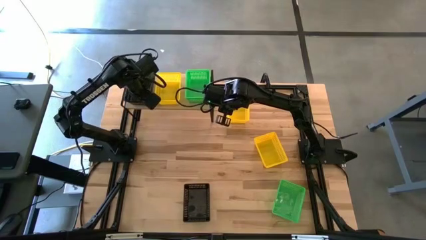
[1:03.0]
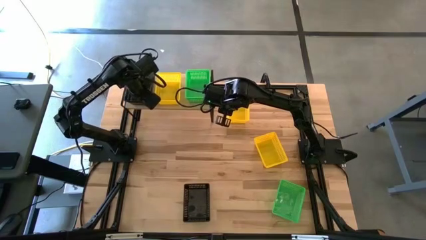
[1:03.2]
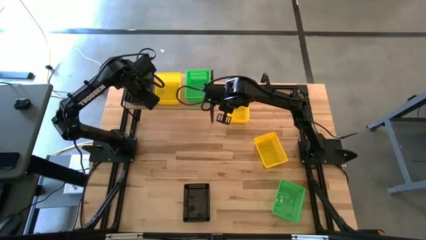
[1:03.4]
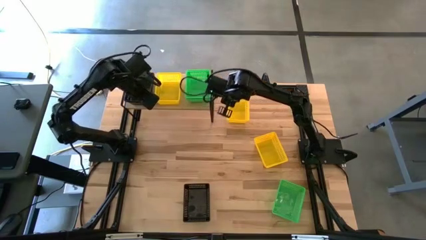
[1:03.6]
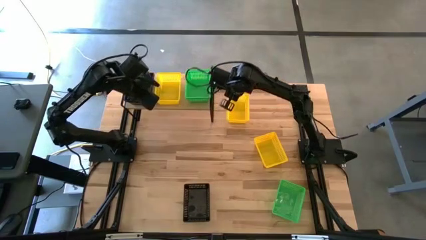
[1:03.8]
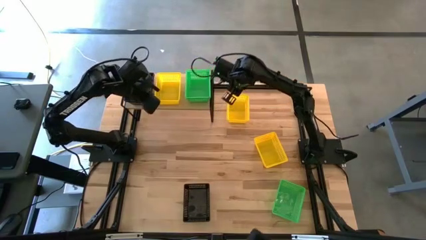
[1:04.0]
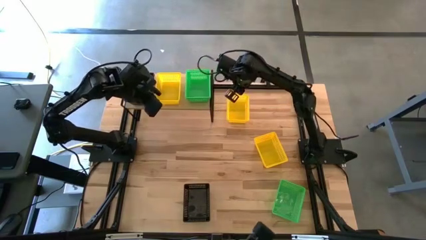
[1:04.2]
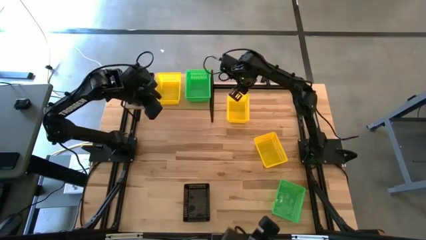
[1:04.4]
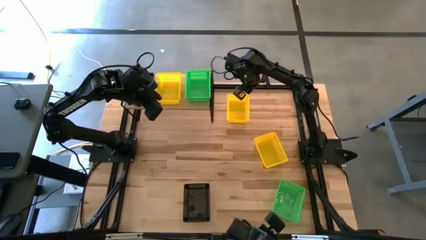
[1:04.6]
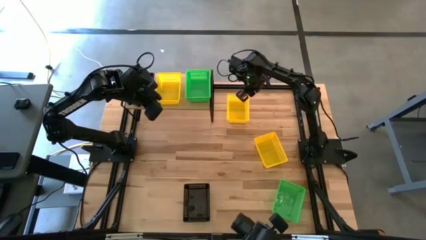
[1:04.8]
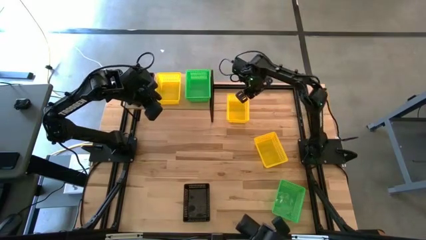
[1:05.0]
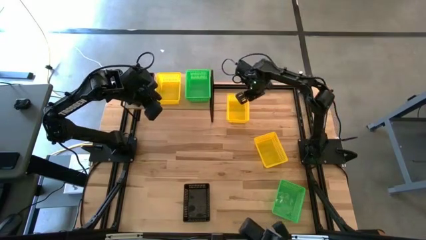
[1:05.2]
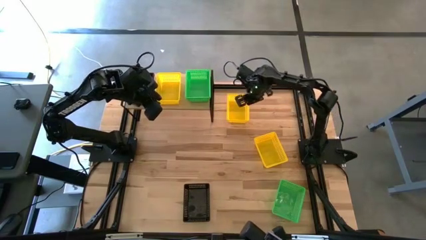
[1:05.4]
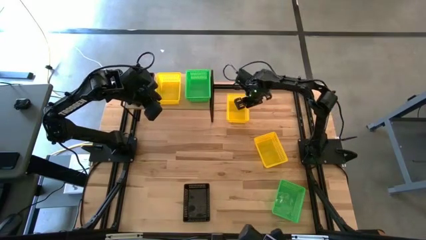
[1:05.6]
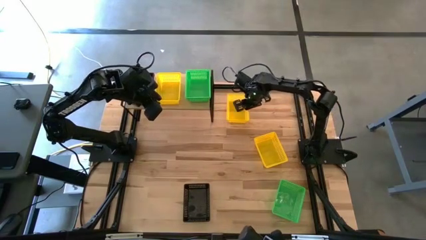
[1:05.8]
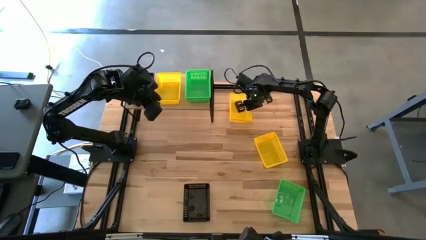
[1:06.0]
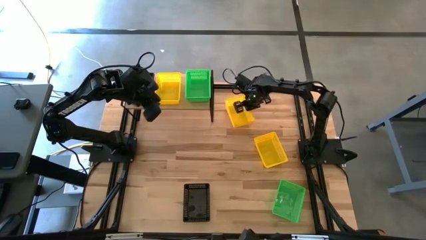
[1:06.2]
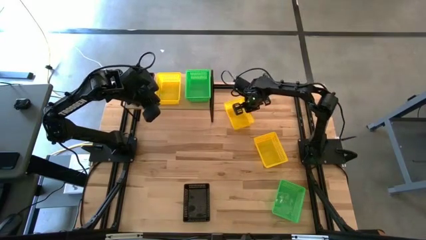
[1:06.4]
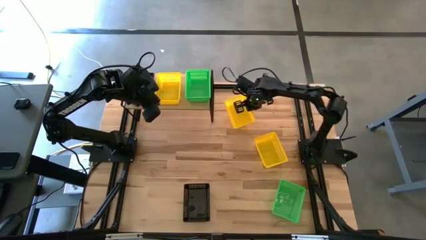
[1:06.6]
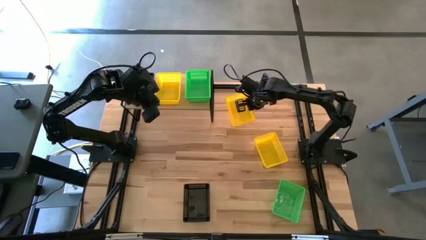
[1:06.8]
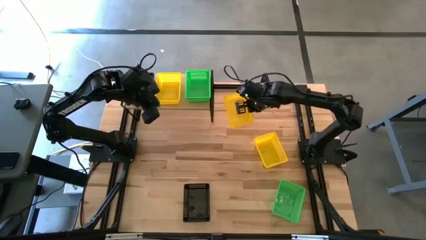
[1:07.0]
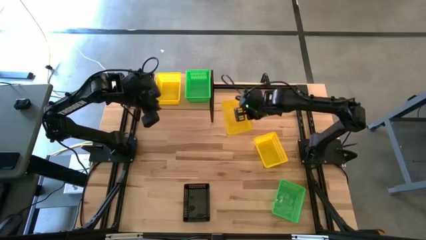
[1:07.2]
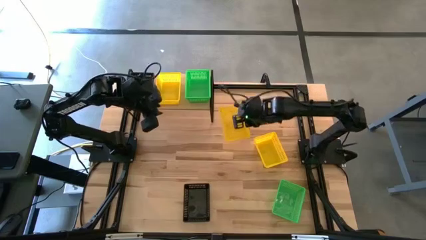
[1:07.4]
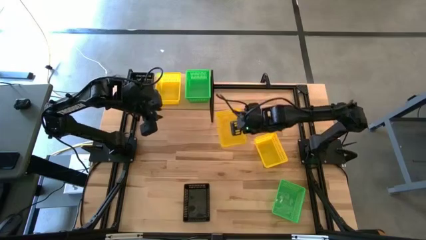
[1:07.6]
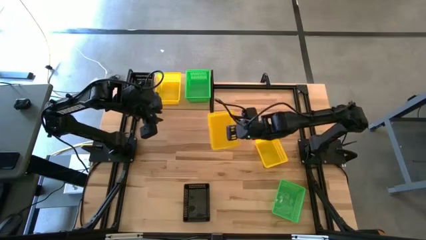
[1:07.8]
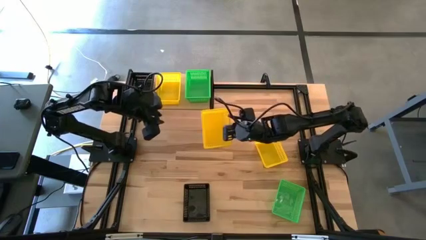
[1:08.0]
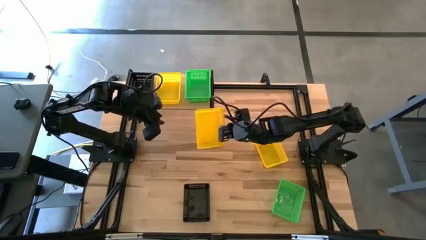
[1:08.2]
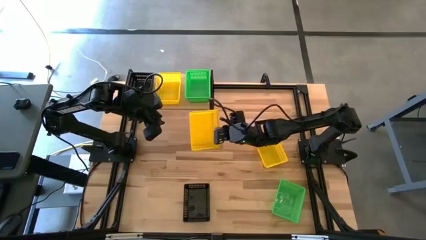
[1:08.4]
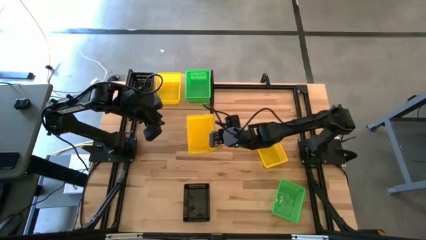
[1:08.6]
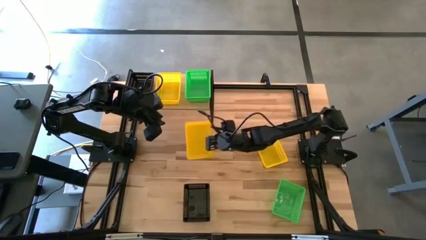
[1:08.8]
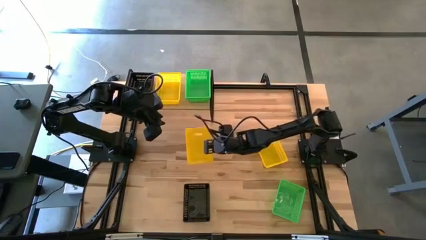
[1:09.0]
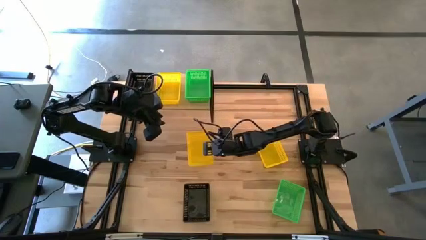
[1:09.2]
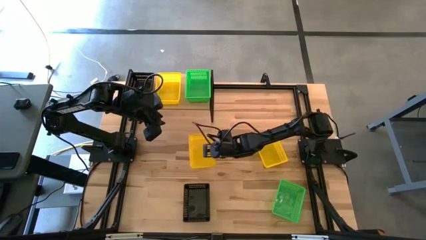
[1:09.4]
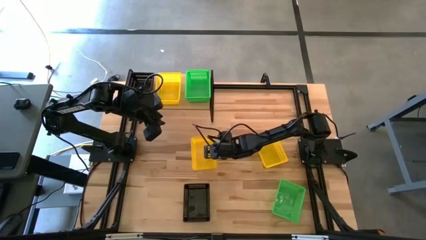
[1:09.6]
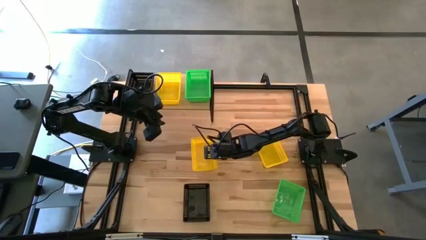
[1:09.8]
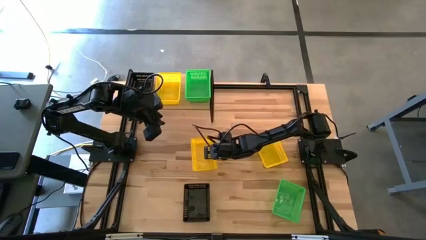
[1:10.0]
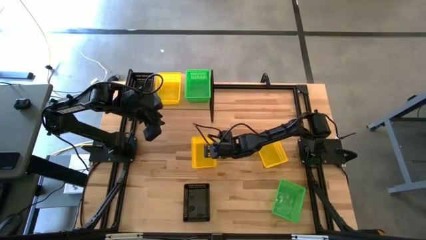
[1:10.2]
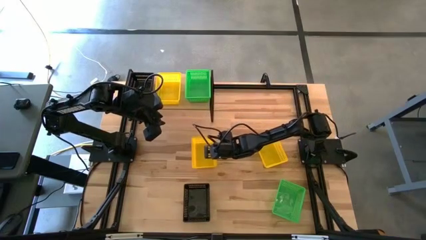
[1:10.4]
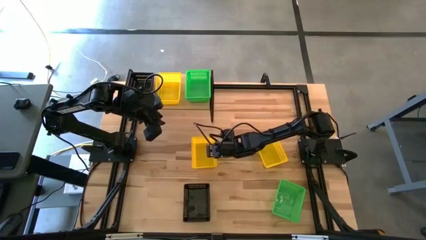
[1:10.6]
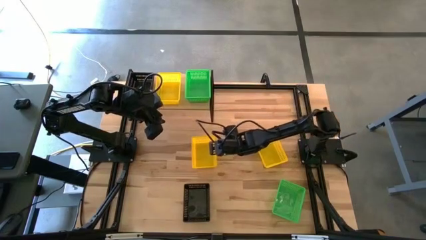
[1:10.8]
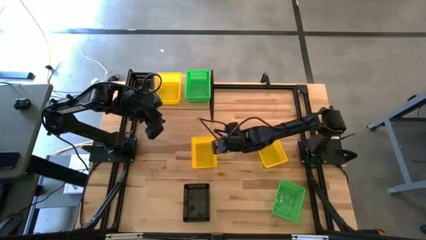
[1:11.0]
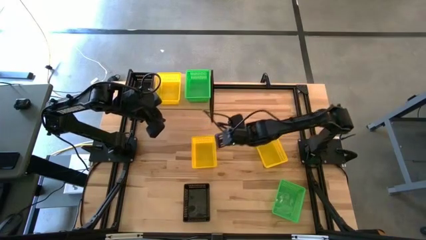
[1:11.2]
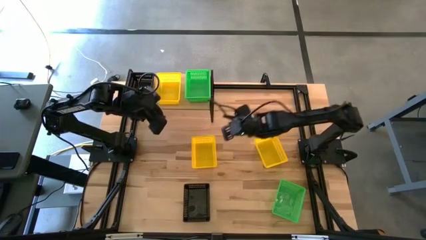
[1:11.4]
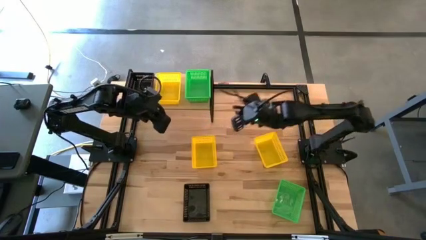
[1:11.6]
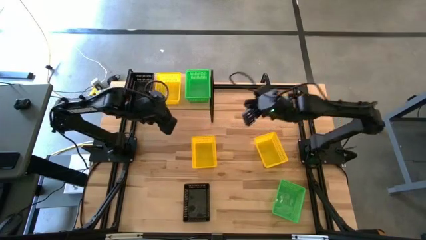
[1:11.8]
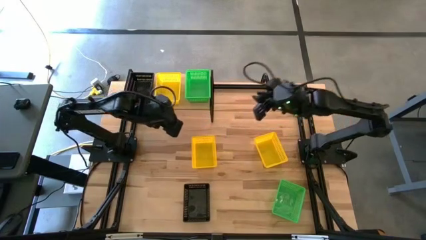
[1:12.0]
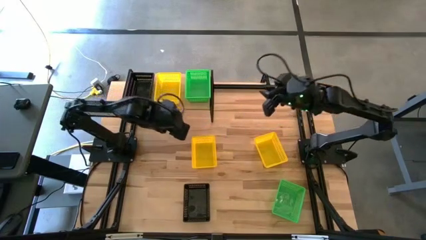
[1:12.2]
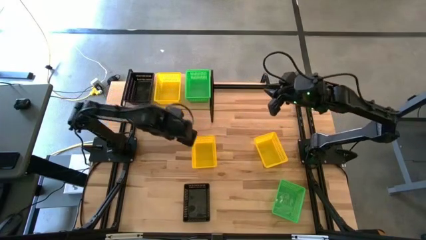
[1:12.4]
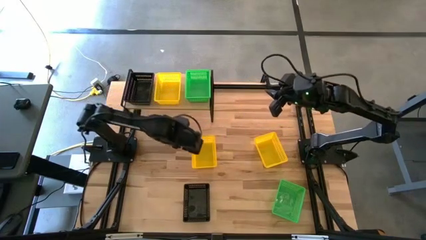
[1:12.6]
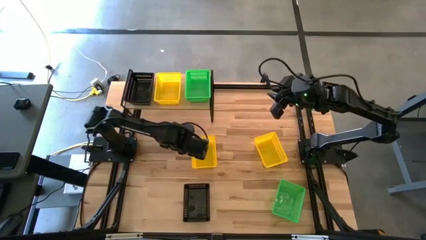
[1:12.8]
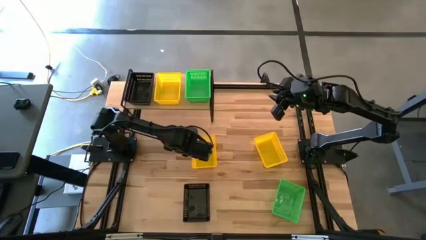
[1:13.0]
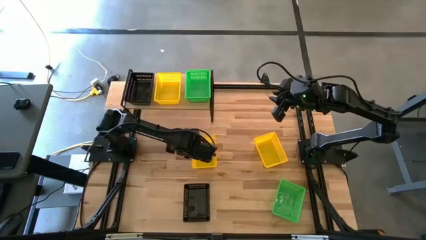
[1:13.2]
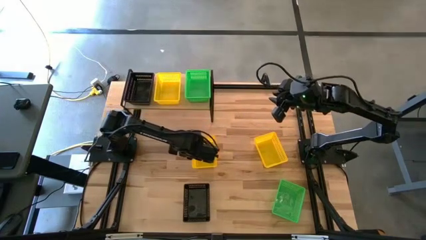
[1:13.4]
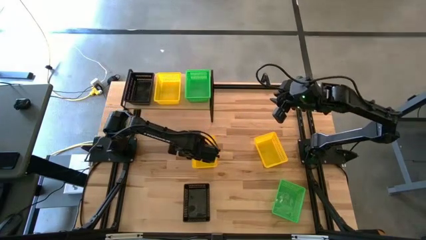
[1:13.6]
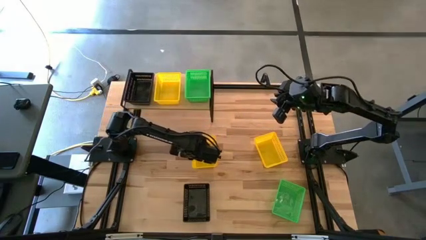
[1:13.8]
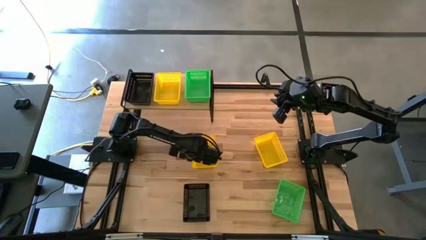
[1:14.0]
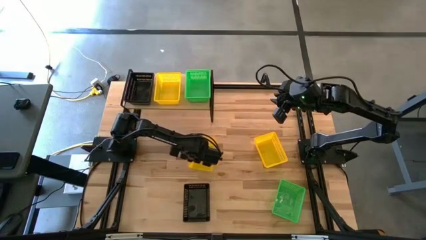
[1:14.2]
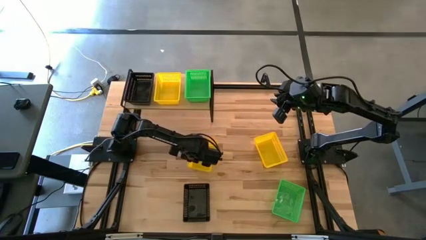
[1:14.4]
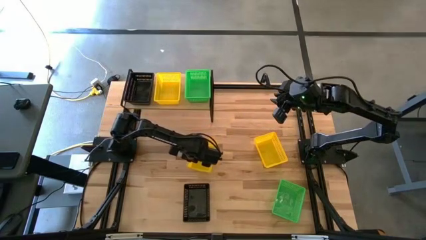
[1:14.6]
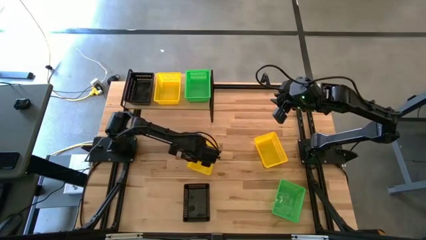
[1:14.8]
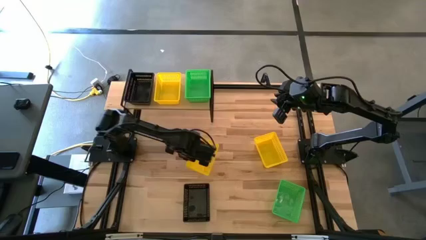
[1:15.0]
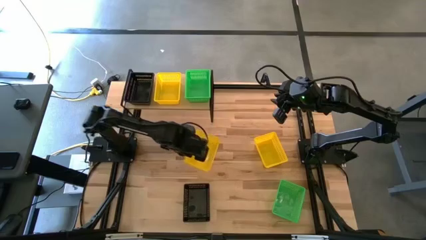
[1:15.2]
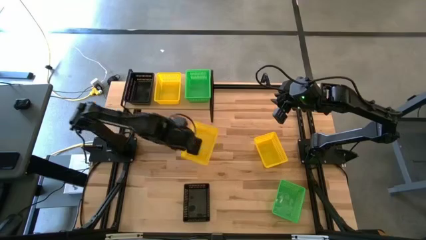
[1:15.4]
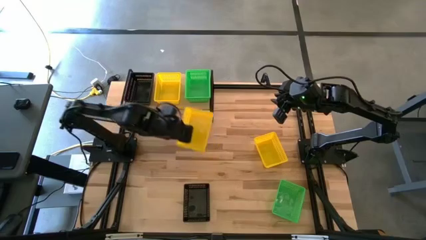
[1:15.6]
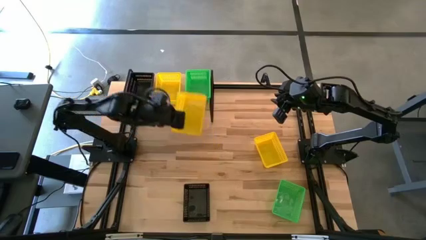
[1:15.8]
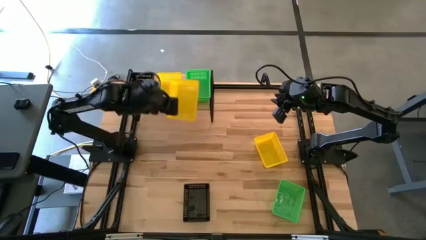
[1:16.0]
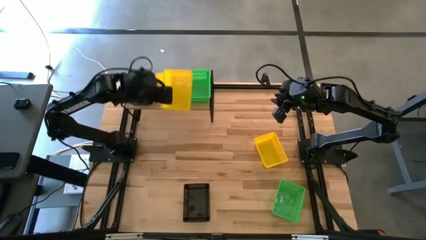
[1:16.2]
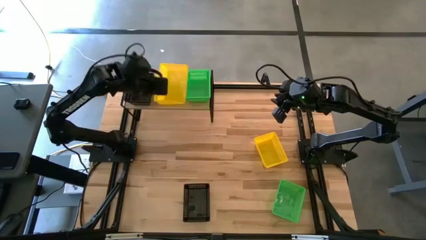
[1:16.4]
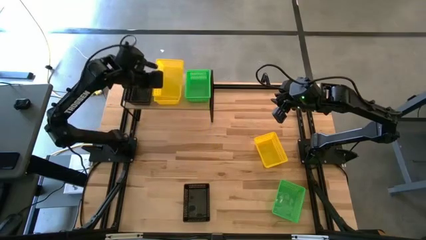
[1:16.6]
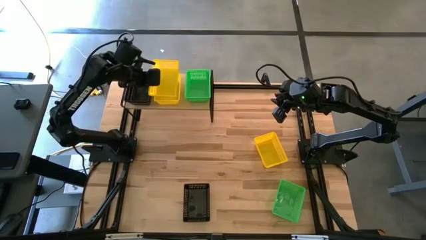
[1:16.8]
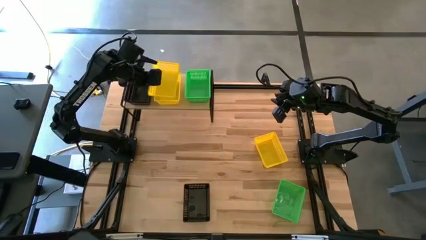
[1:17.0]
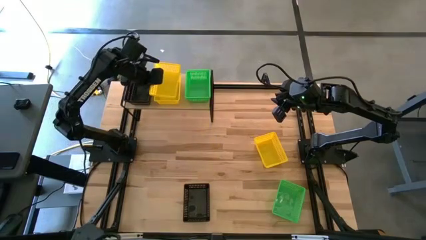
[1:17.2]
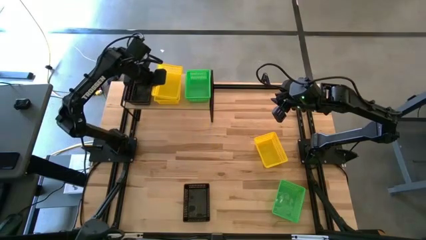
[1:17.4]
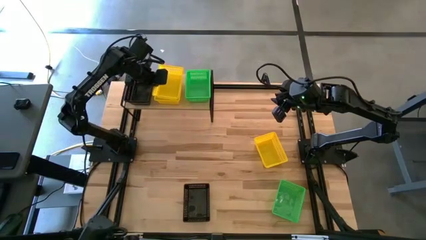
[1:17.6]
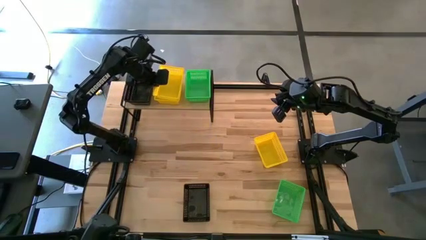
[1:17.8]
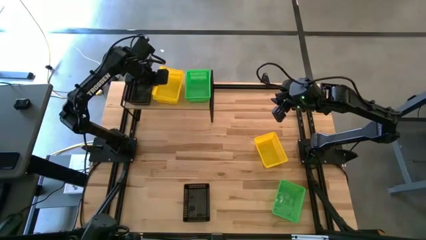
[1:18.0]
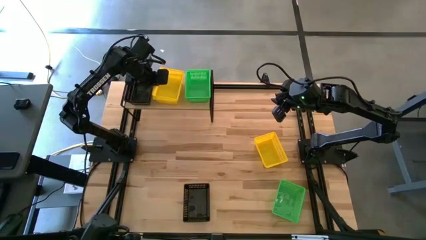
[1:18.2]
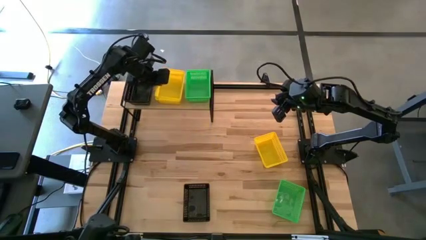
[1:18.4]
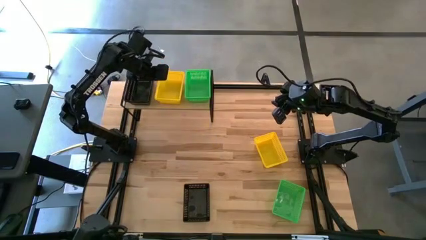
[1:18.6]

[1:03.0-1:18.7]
Task: Stack baskets on shelf by color
Stack the top yellow bin on top of the yellow bin
